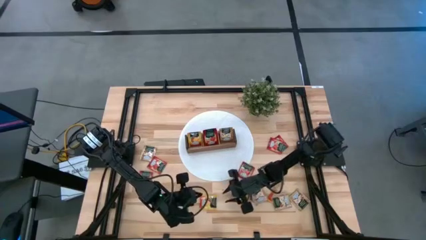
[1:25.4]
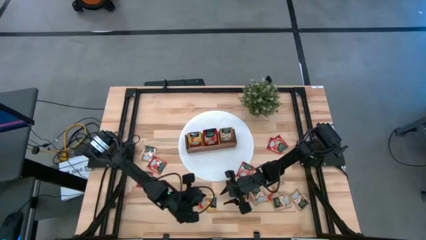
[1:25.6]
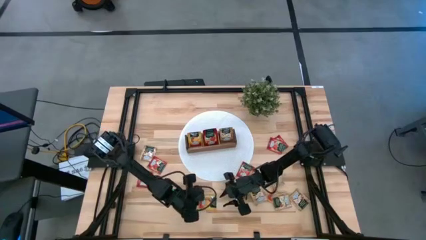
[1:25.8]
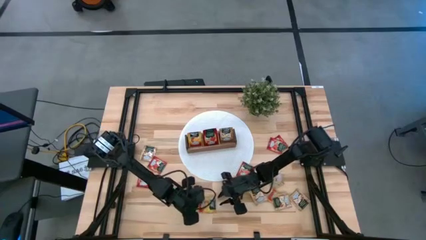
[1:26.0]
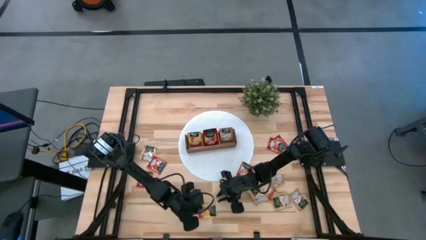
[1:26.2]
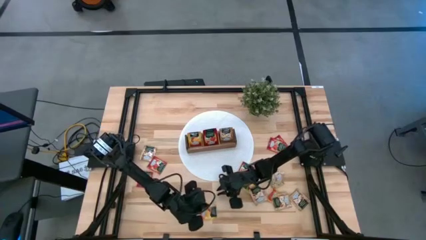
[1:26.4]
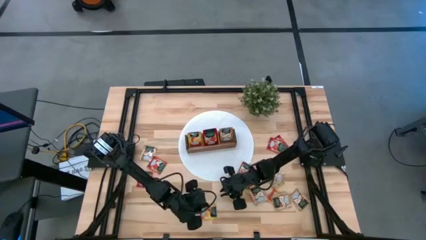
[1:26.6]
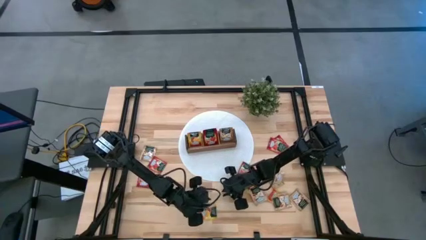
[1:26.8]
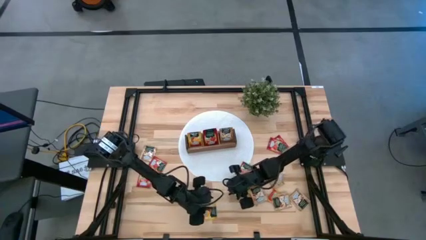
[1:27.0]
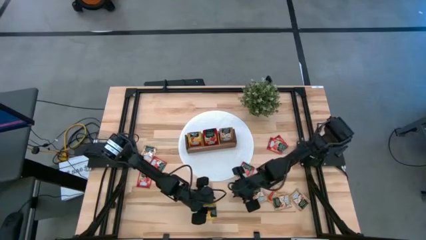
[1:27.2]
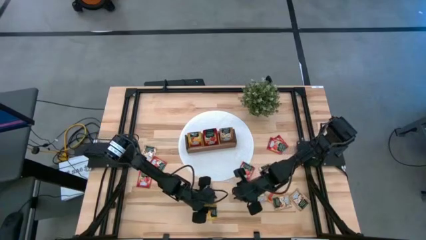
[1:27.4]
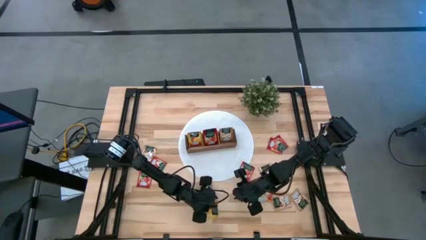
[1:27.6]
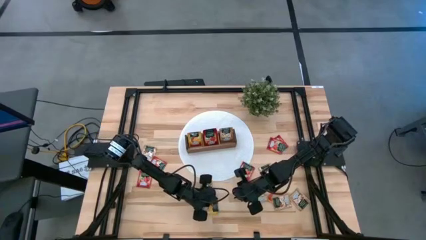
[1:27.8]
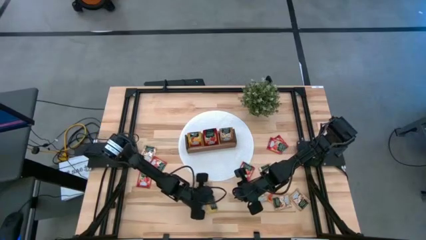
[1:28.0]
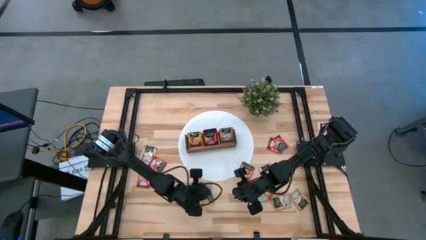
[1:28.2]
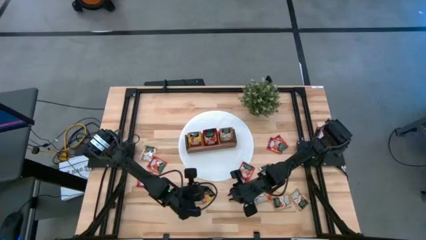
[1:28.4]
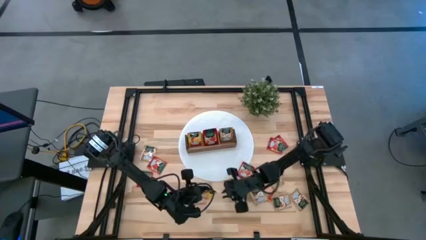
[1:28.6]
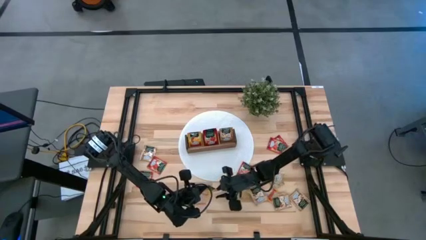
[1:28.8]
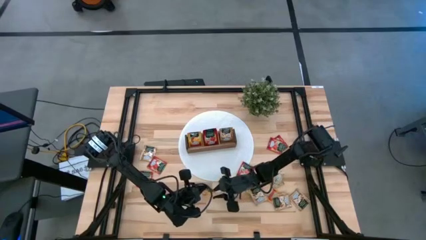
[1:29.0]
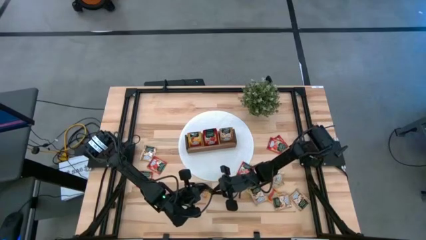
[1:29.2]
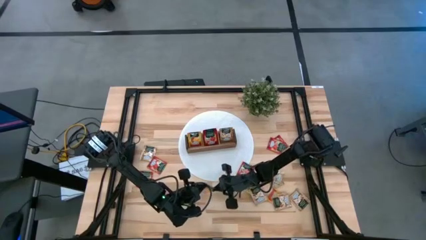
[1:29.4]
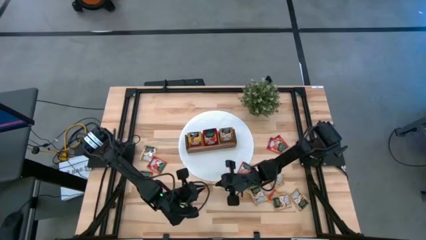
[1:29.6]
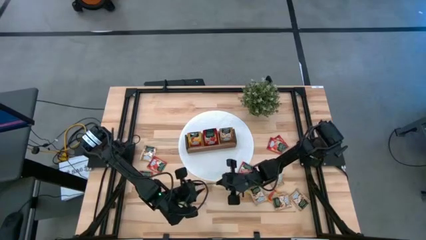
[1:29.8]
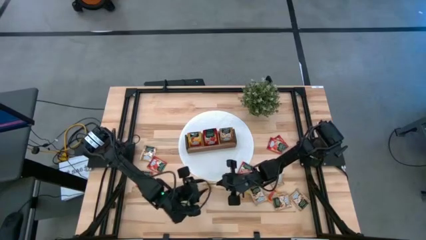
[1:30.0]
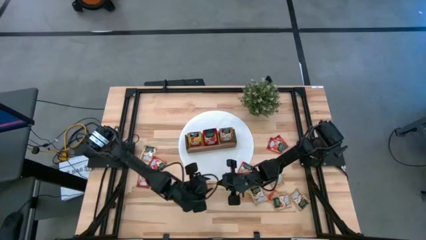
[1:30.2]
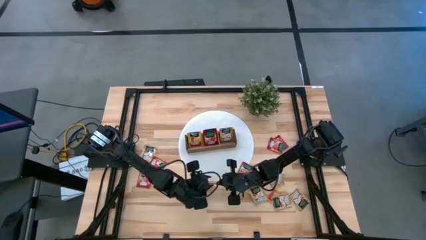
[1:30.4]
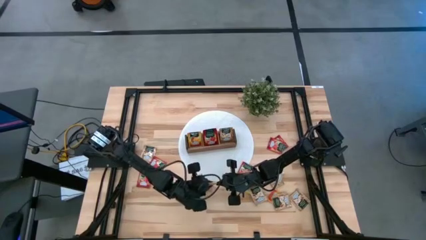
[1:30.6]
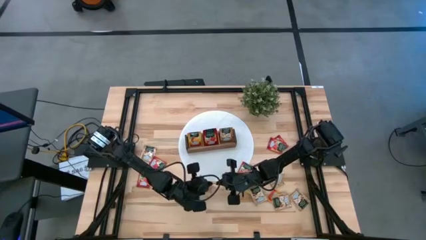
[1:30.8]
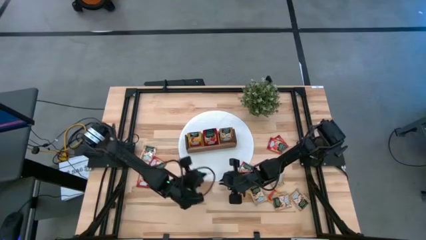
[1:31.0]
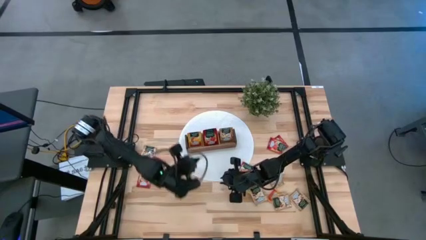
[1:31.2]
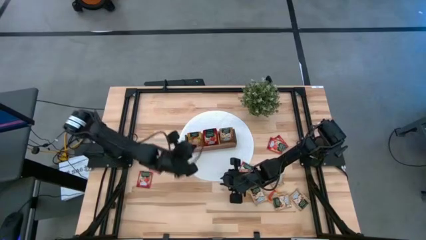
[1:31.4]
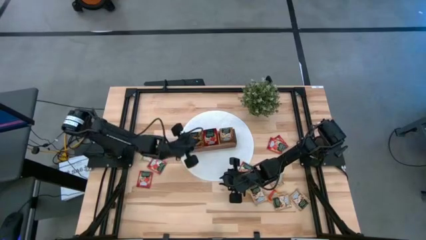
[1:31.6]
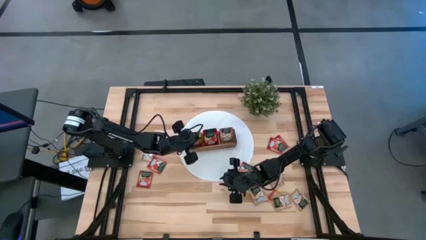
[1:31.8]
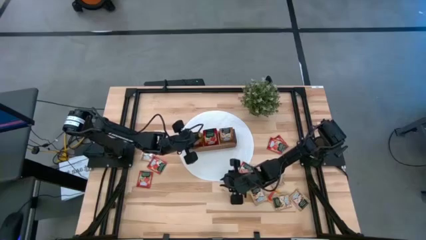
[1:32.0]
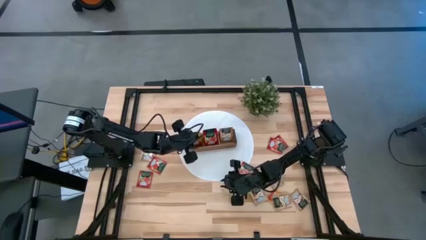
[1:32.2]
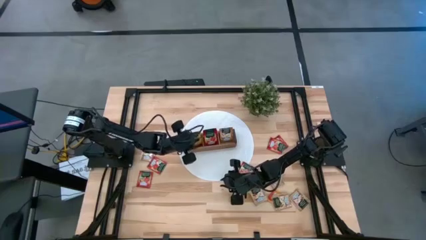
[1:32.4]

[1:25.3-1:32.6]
Task: Pick & Place Tea
Put the orange tea bag into the left section of the wooden organizer

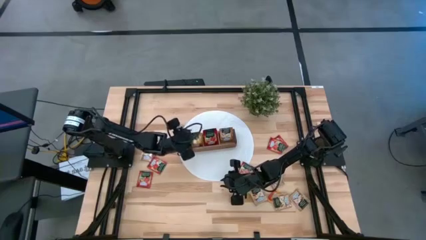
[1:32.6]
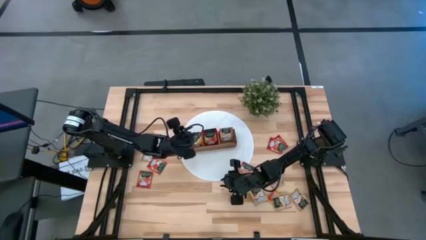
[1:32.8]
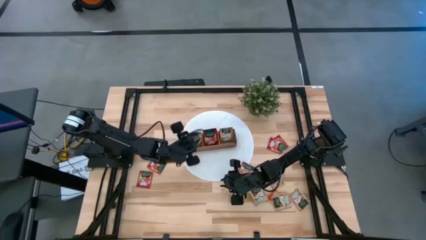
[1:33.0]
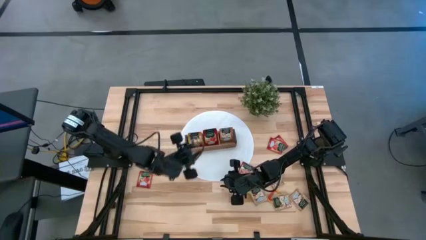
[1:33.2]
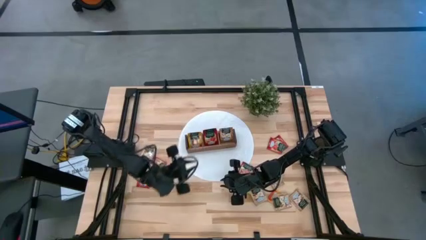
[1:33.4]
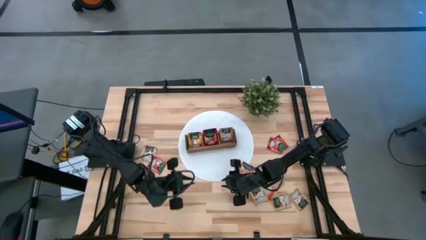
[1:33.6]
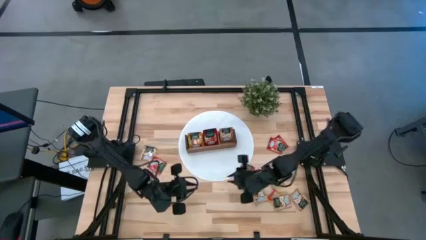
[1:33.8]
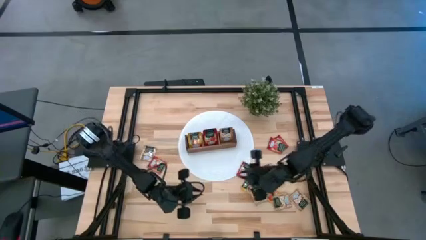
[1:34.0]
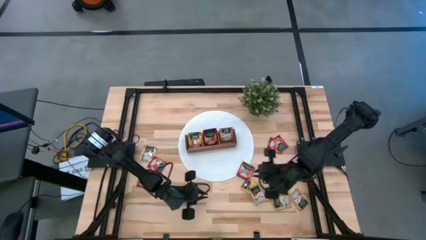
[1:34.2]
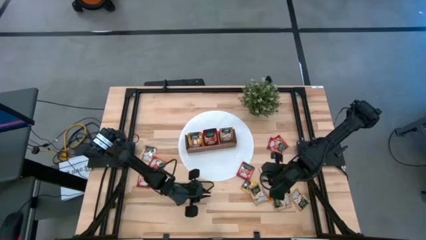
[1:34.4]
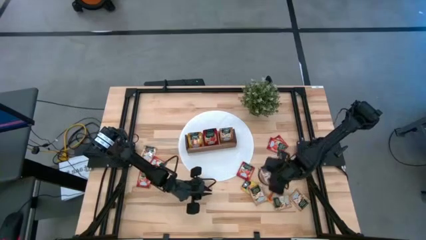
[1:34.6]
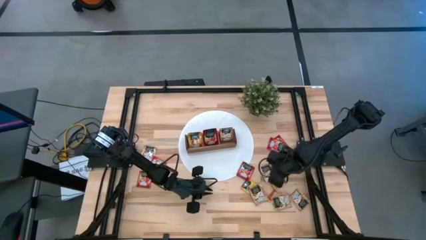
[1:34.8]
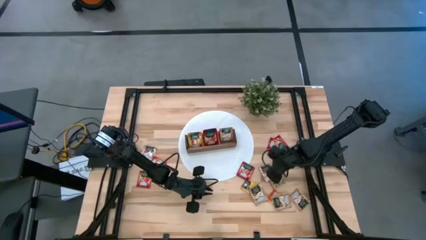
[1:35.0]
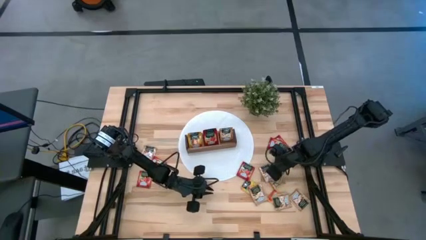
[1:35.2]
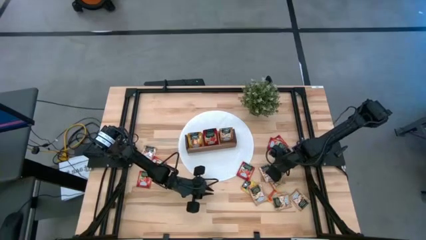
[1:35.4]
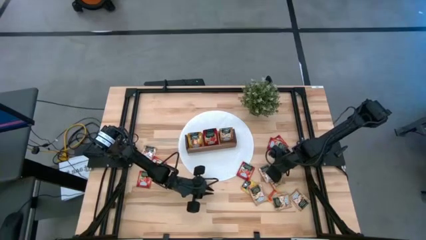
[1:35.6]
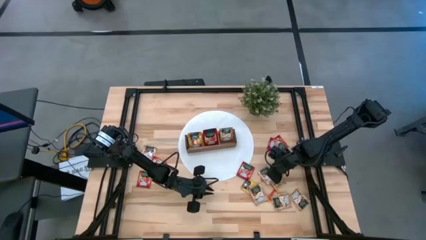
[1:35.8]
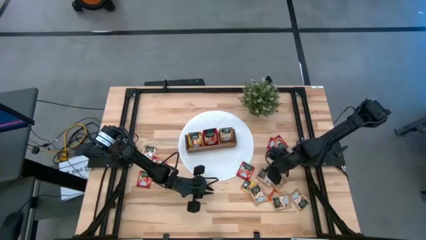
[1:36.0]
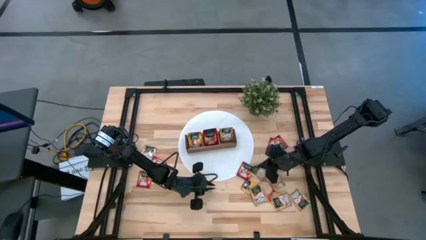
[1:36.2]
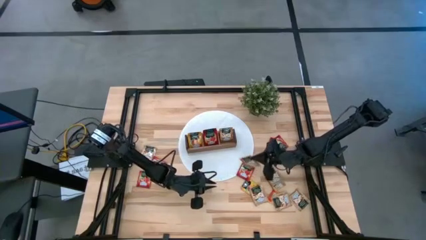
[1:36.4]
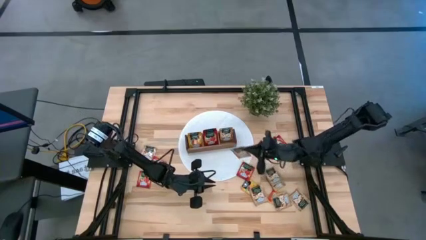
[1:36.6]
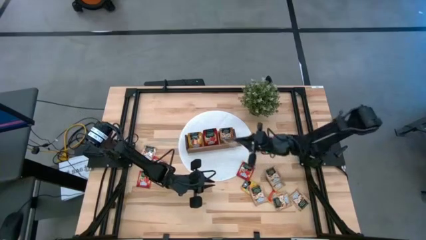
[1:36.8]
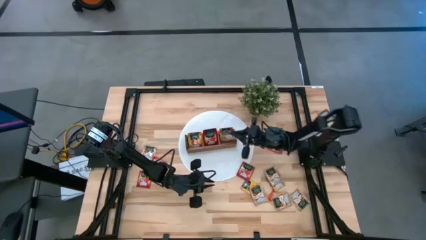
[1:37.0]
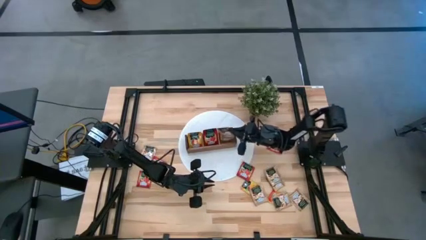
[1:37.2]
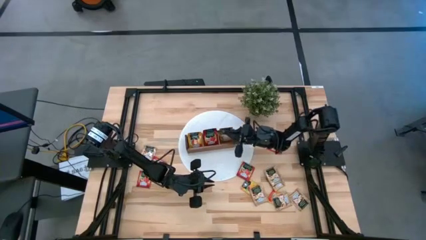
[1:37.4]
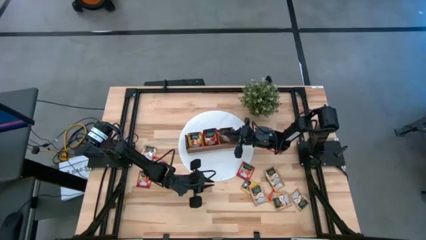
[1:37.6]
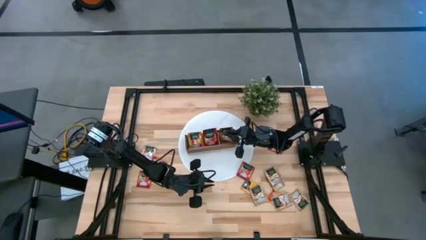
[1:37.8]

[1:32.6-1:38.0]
Put the brown tea bag into the right section of the wooden organizer

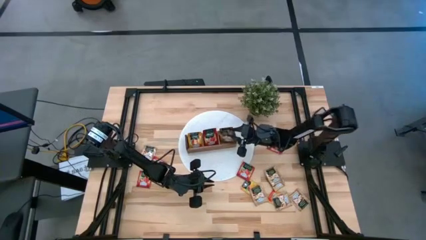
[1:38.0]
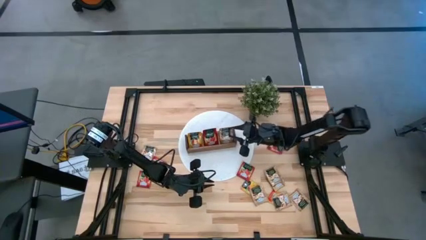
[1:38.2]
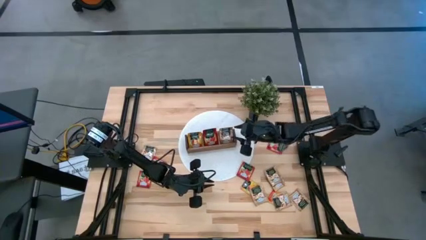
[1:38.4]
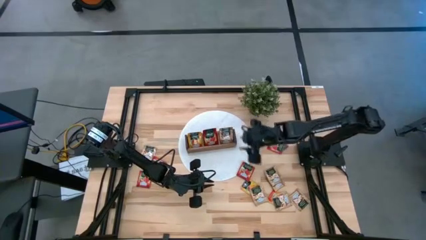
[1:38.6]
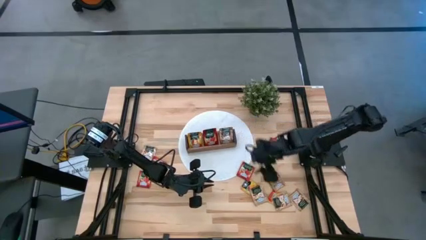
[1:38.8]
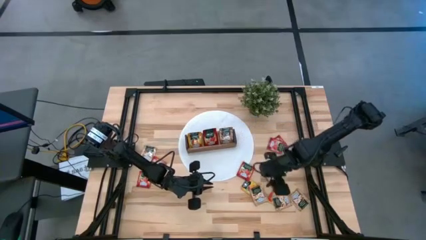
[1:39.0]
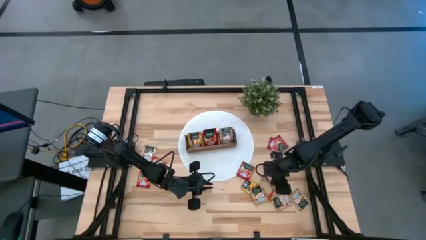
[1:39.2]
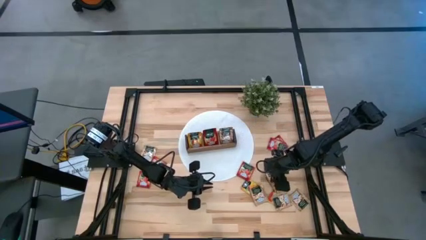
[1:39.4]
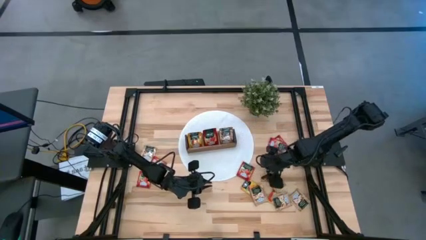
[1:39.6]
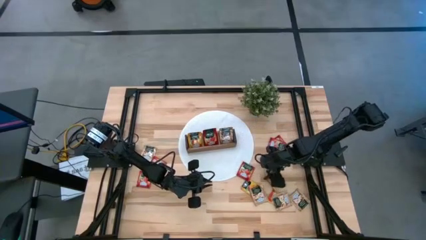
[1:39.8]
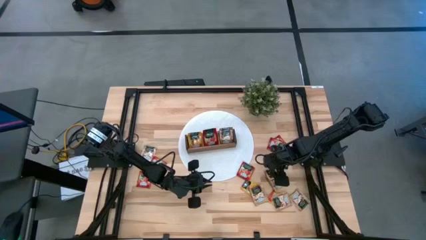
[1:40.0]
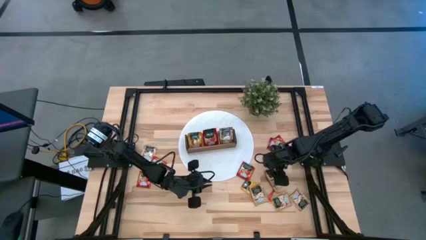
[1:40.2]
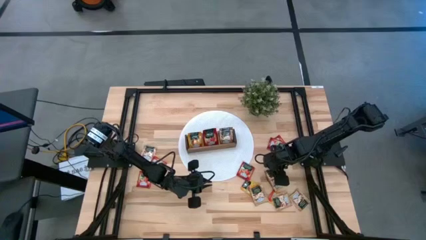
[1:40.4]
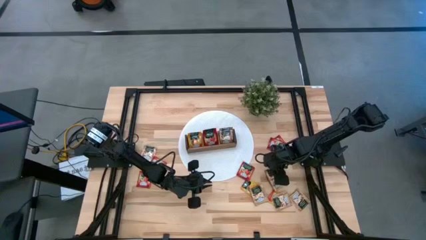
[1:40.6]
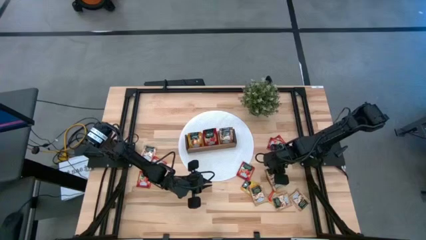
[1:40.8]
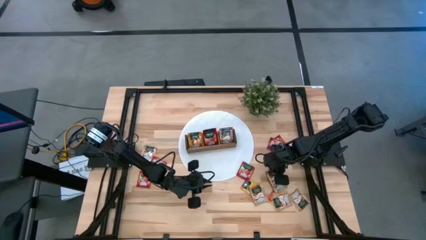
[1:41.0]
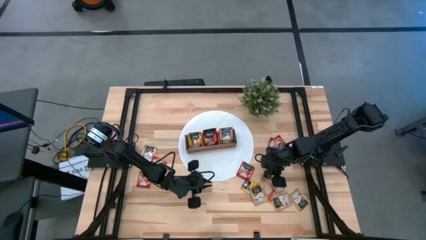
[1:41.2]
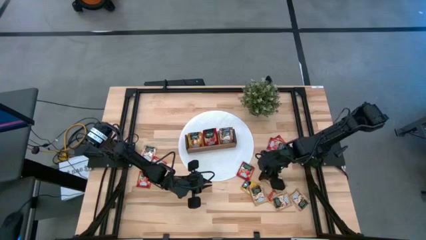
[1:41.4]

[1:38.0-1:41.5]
Put the brown tea bag into the right section of the wooden organizer

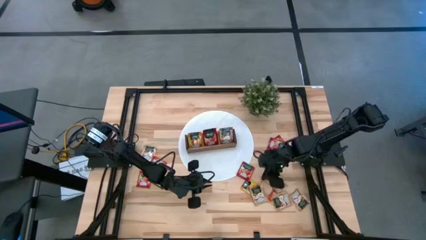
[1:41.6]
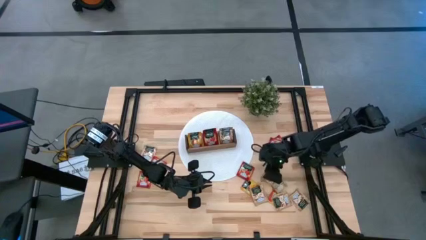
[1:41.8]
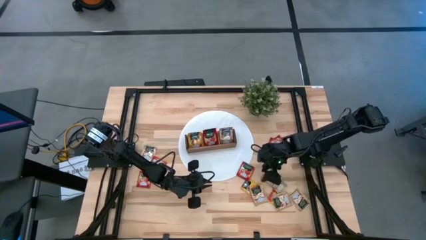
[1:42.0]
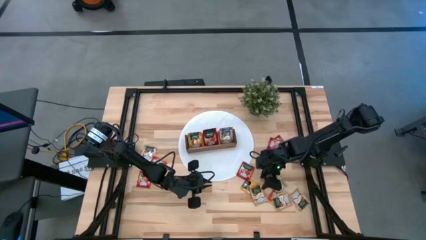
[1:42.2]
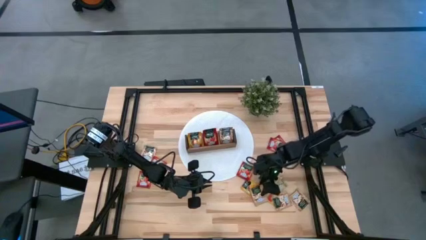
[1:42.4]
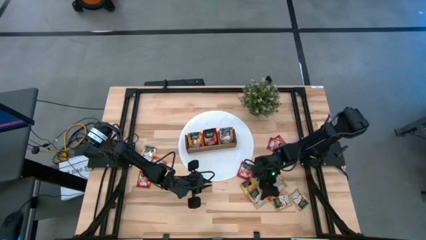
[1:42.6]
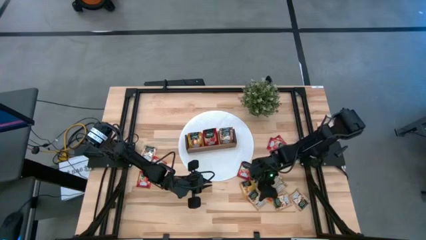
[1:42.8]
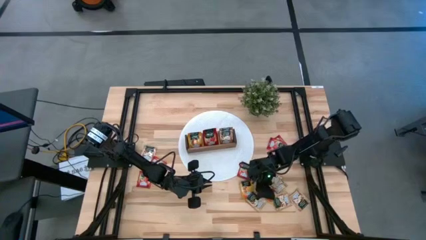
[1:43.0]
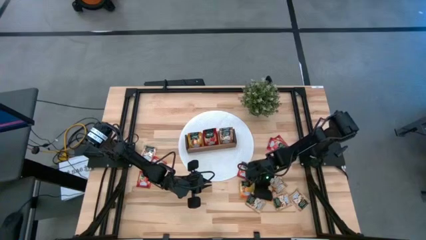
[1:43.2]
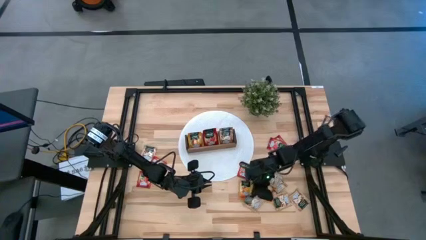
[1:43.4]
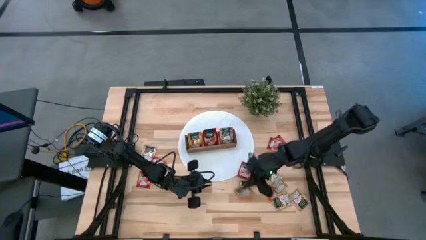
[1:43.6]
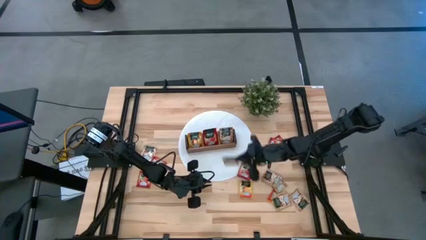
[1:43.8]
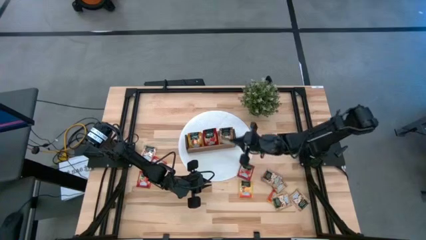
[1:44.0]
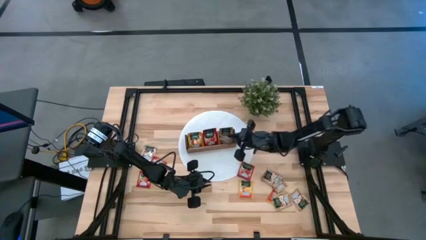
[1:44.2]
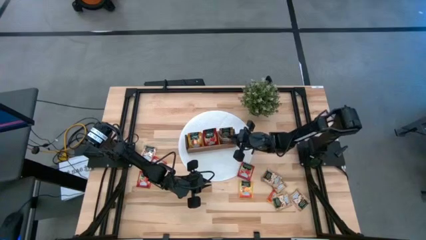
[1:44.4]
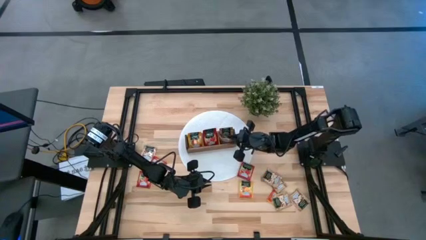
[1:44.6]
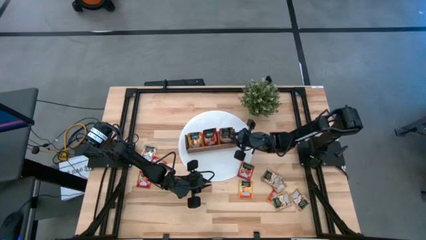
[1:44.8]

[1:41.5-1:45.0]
Put the brown tea bag into the right section of the wooden organizer
